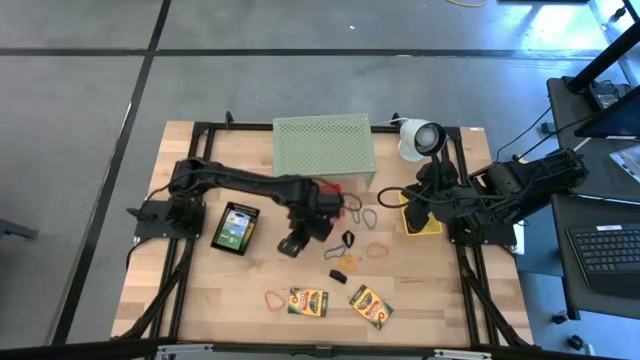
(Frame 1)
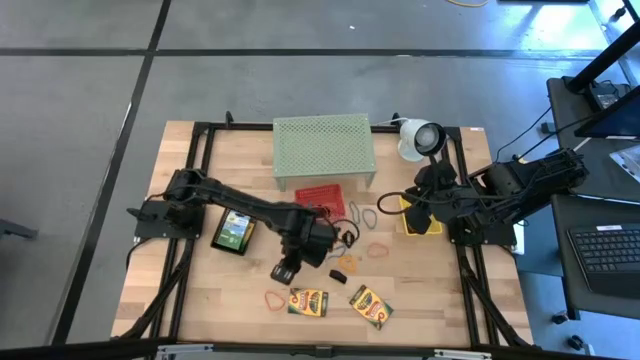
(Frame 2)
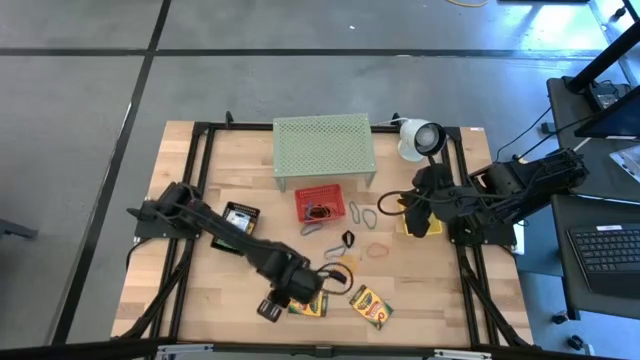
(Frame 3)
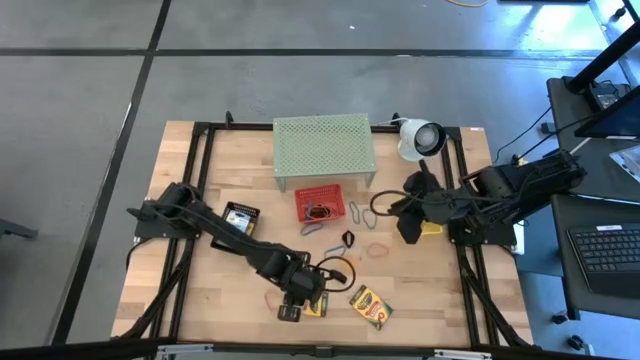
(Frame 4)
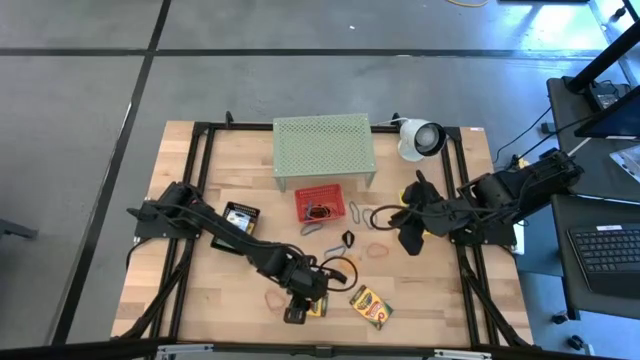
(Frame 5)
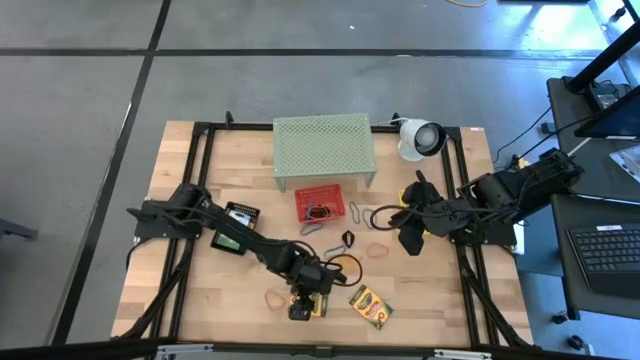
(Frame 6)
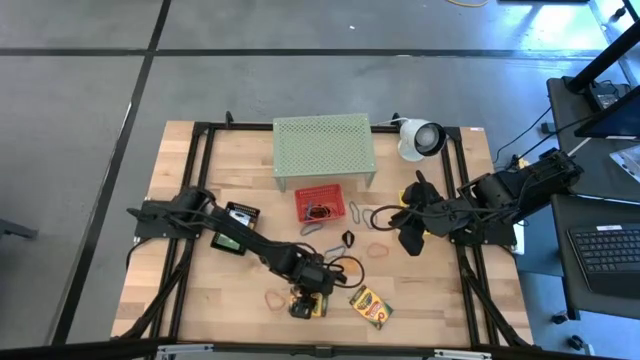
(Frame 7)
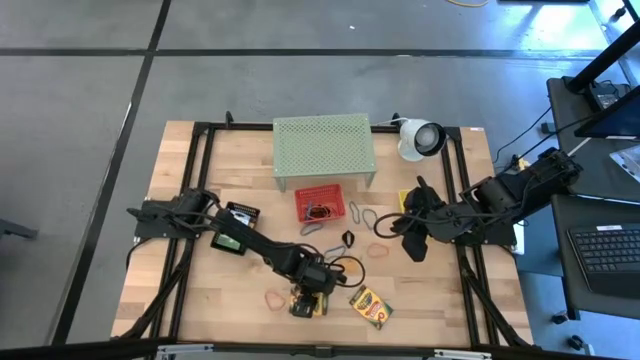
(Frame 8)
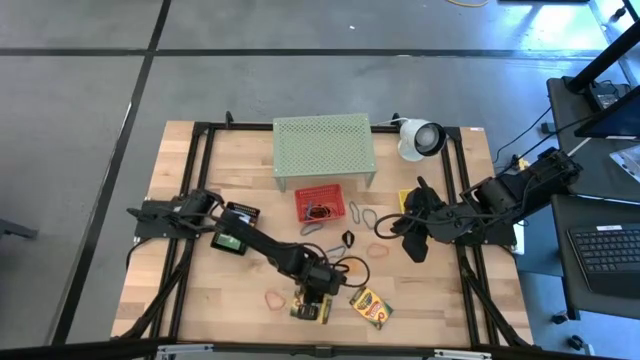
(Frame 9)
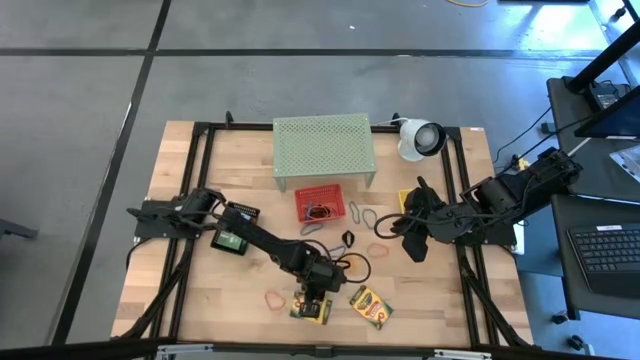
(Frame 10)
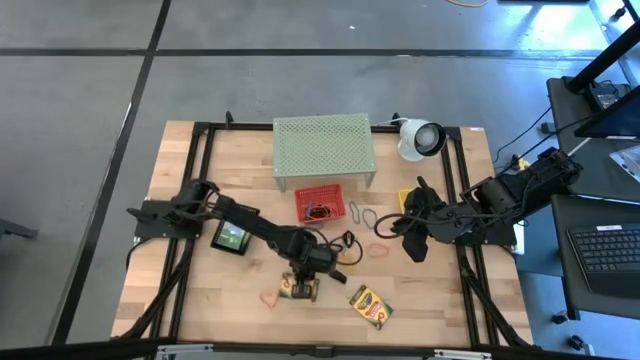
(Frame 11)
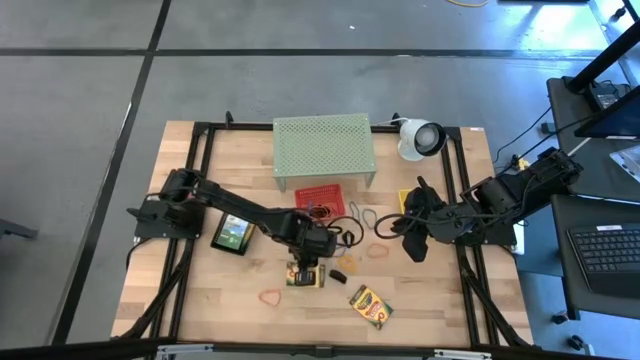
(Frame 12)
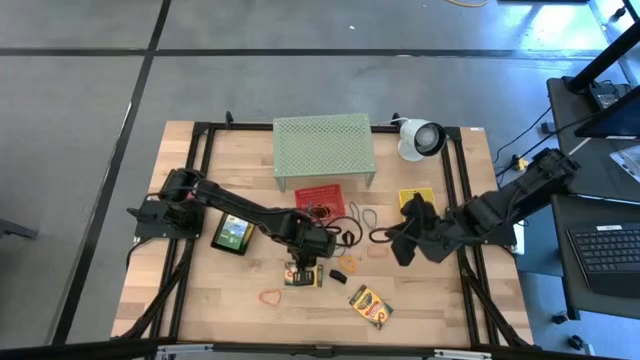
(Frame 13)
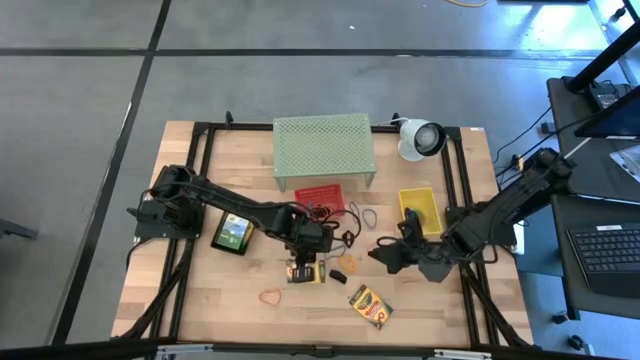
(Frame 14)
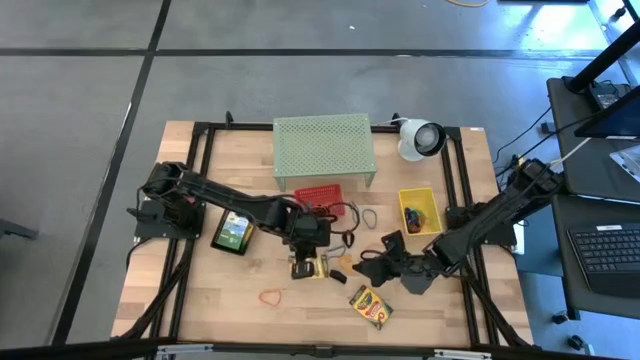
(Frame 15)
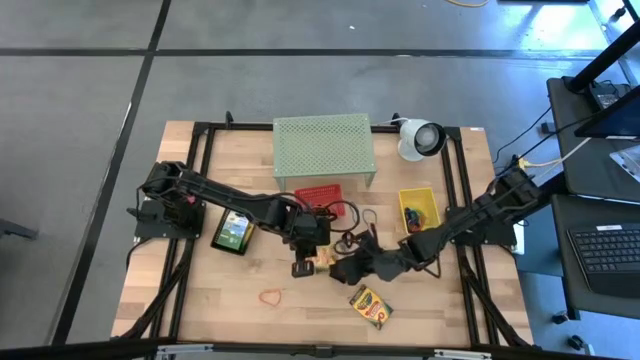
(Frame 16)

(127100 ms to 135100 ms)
Task: Pick & Place Office Desk Supplies
Put the yellow crayon box into the black bin

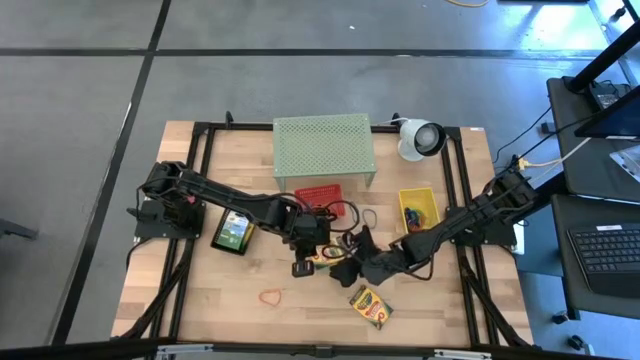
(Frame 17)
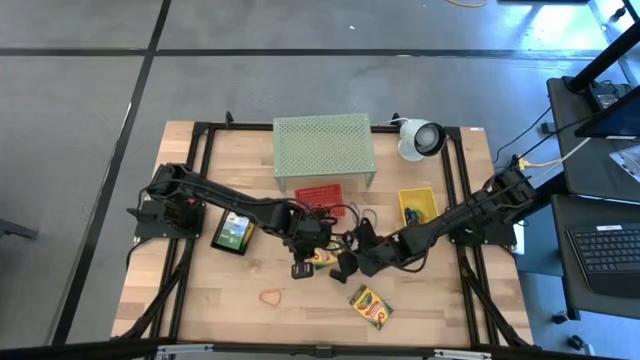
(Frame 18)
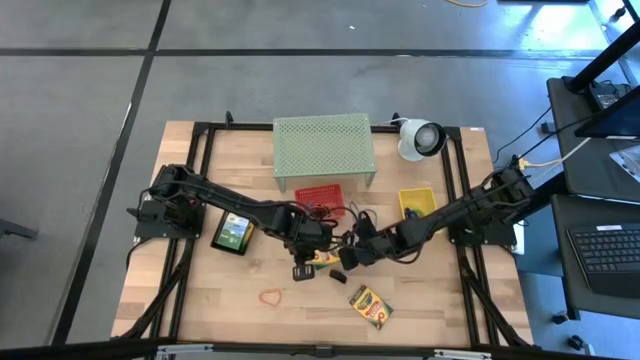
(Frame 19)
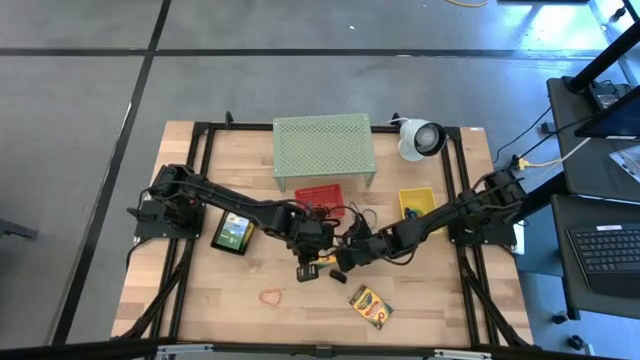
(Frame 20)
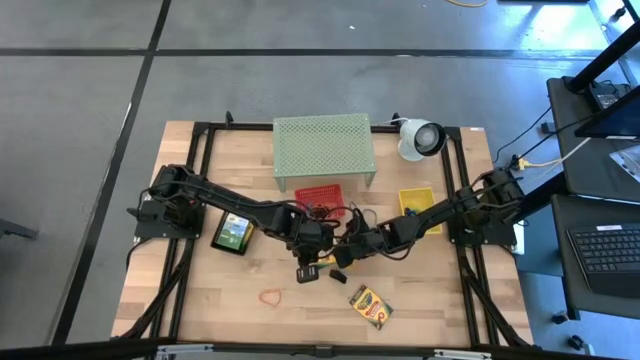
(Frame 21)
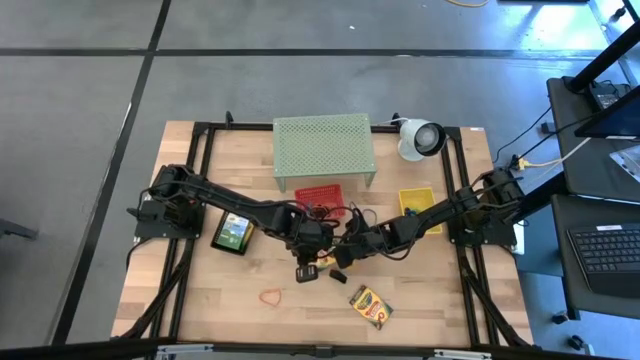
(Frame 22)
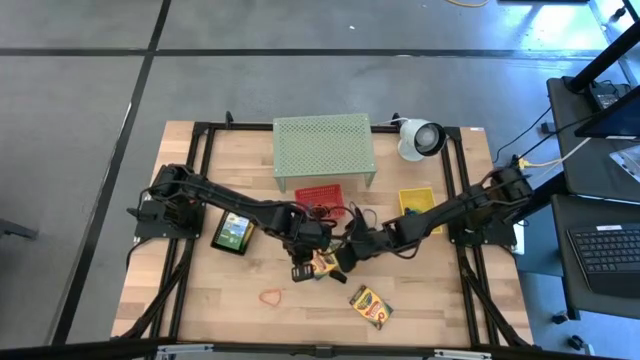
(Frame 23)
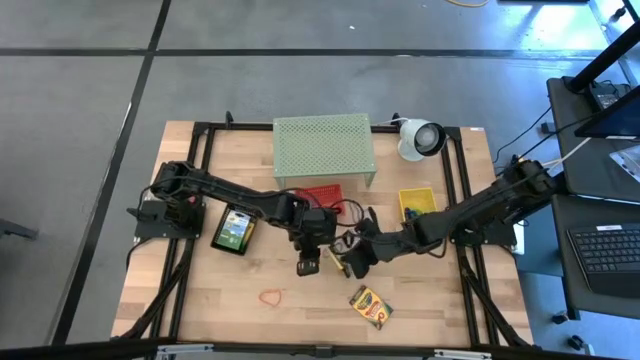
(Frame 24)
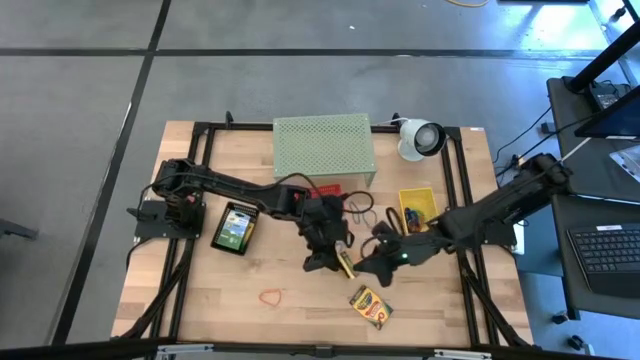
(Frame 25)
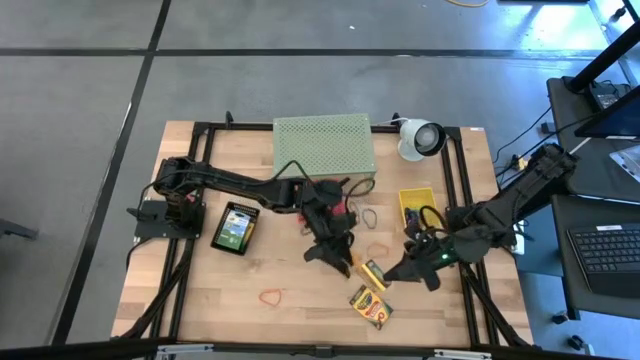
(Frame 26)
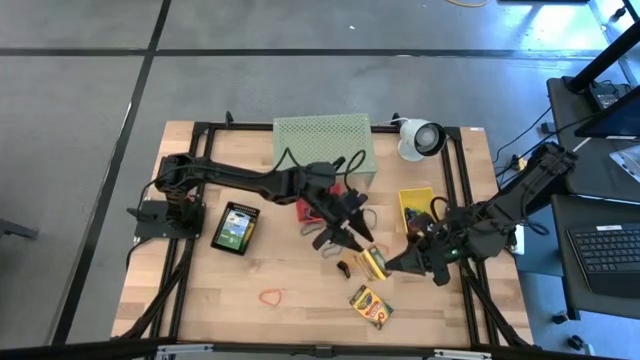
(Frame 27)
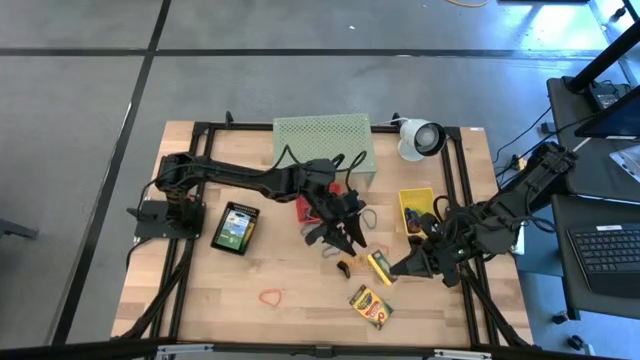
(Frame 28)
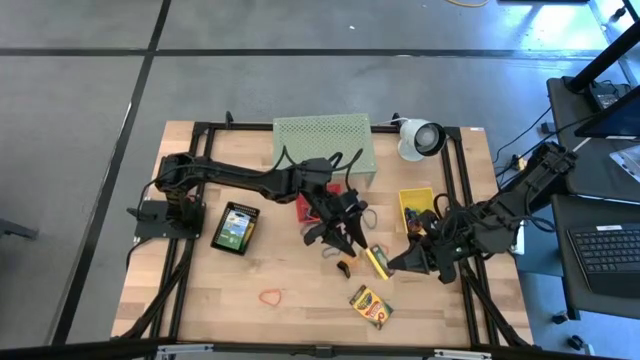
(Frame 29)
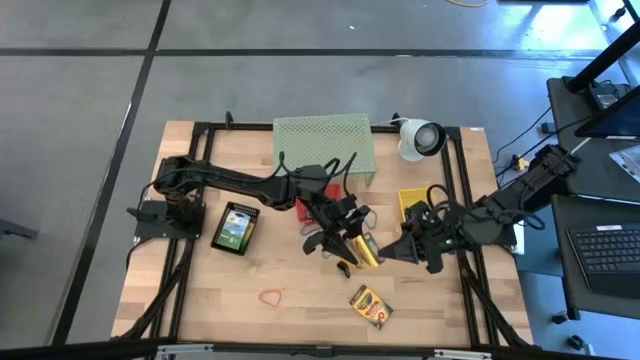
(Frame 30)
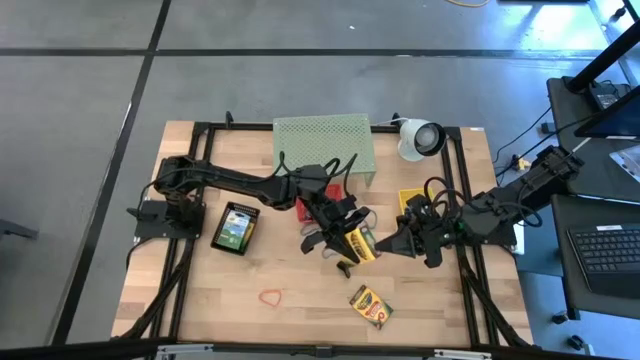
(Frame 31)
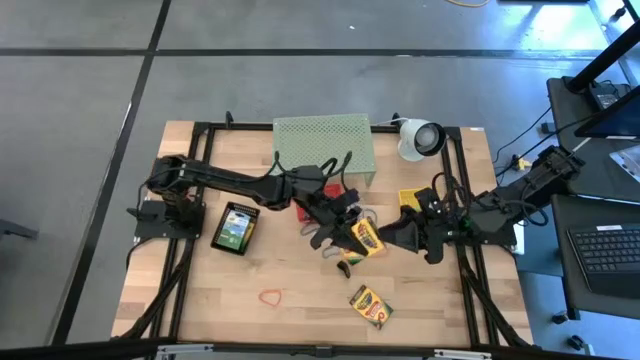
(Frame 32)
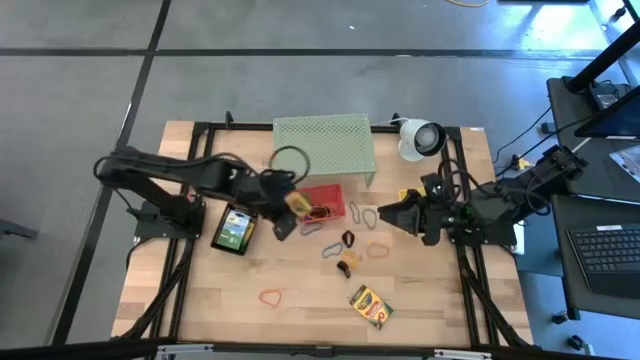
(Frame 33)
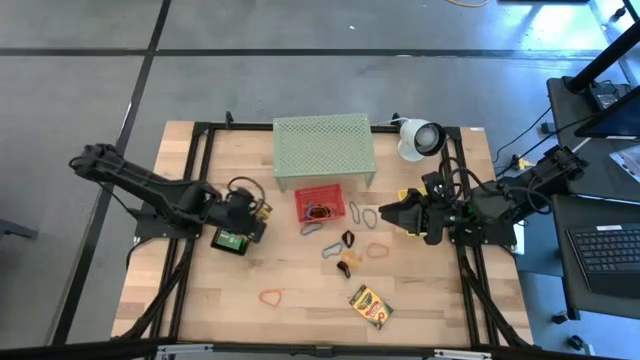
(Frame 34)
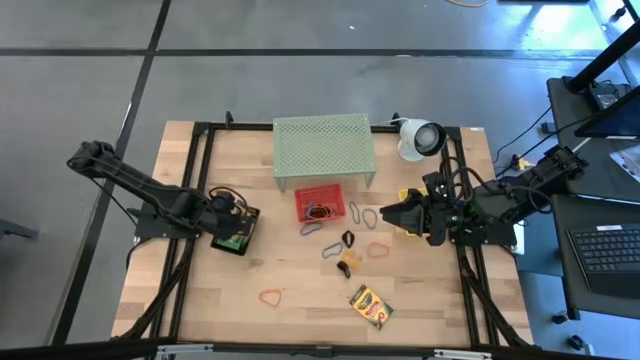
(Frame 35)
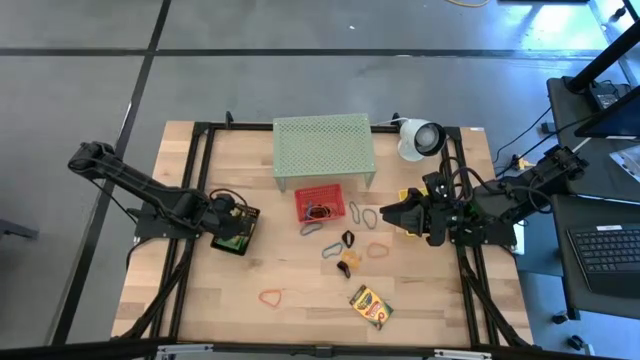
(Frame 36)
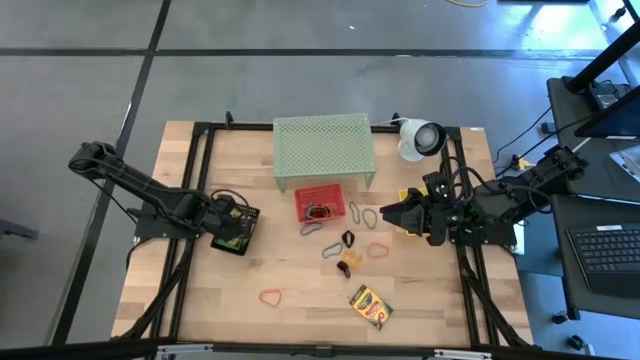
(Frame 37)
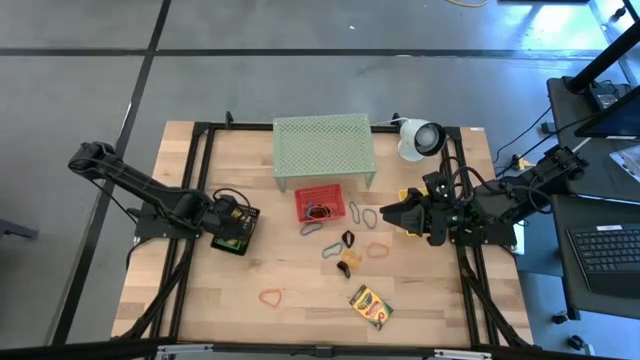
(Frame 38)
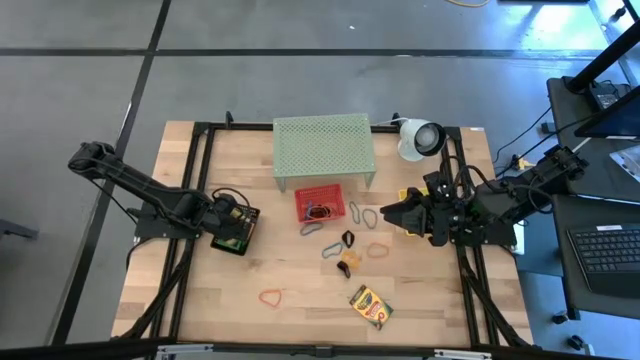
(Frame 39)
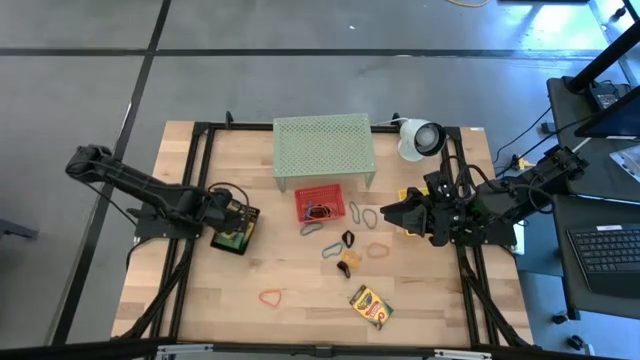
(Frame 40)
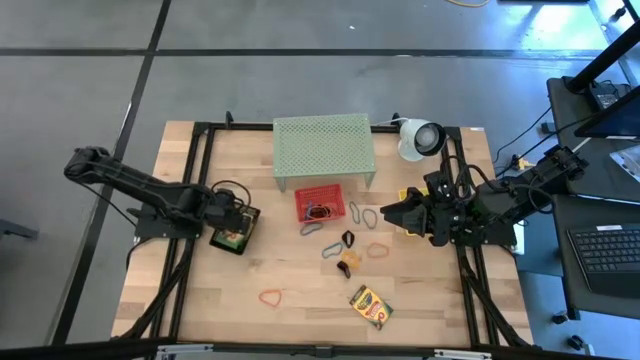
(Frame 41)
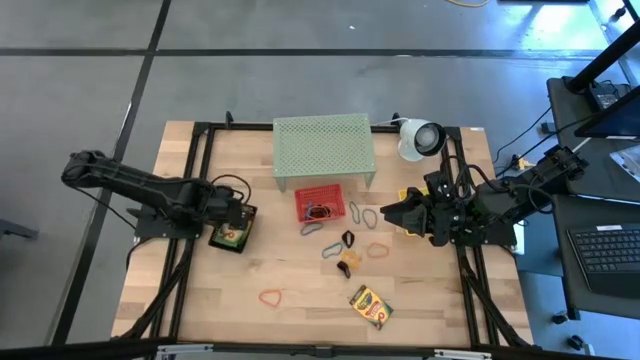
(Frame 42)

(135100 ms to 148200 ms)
Put the yellow crayon box into the black bin

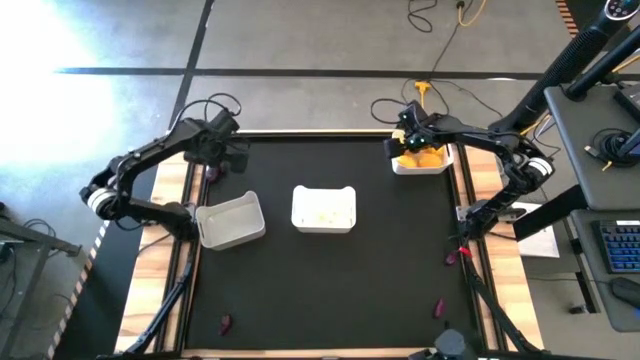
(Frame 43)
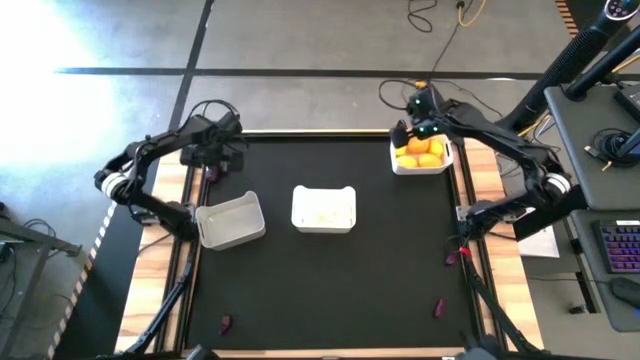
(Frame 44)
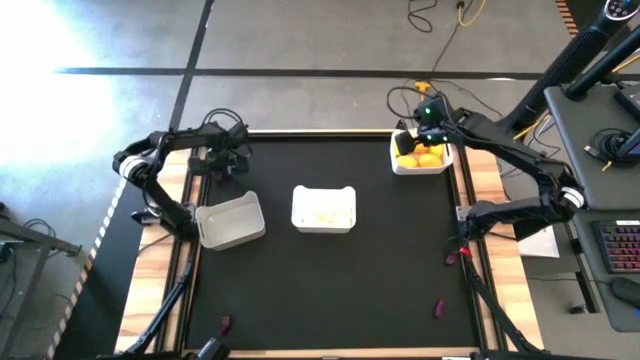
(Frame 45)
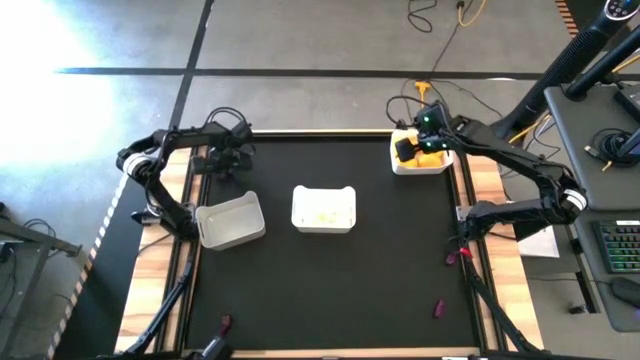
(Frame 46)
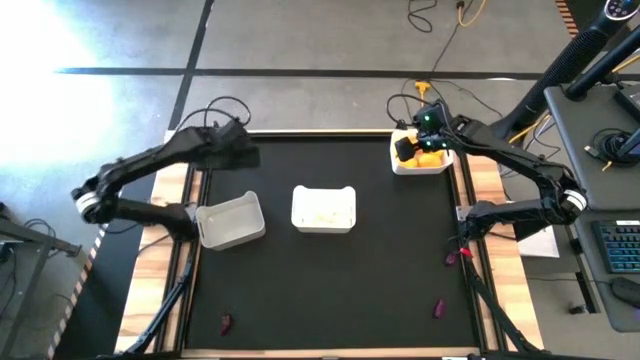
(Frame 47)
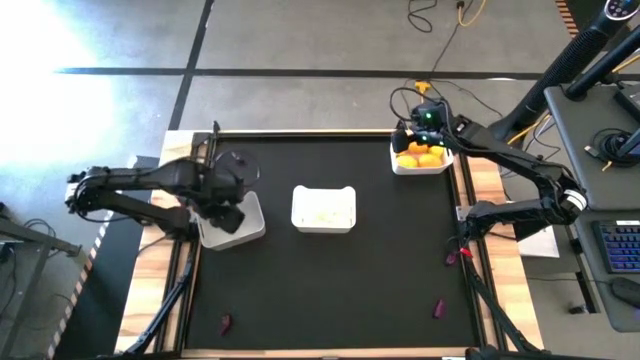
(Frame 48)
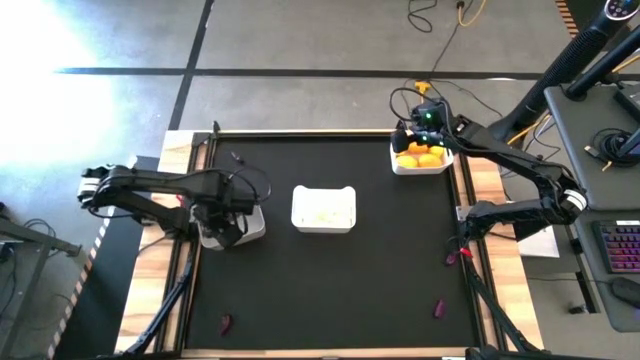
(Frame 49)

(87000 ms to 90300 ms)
Task: Sort produce into baskets
Put the purple eggplant into the gray bin
